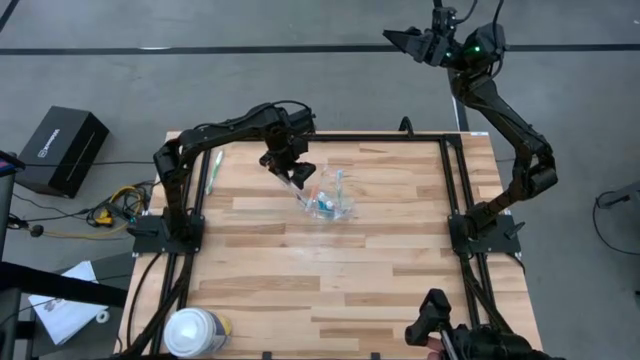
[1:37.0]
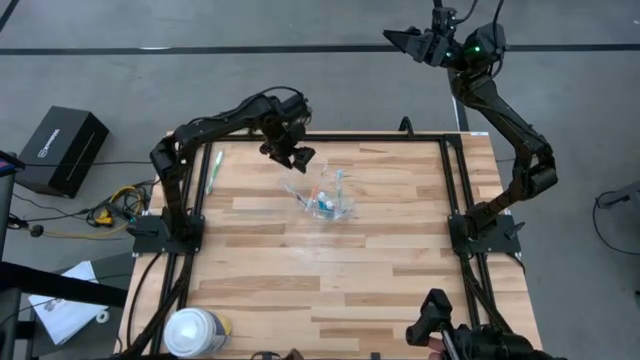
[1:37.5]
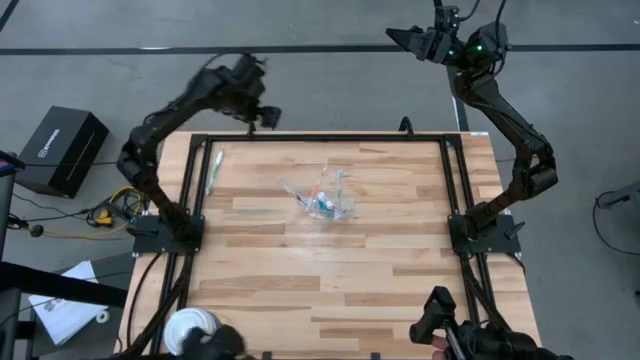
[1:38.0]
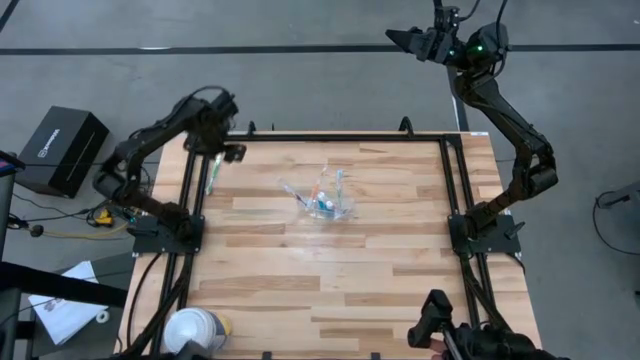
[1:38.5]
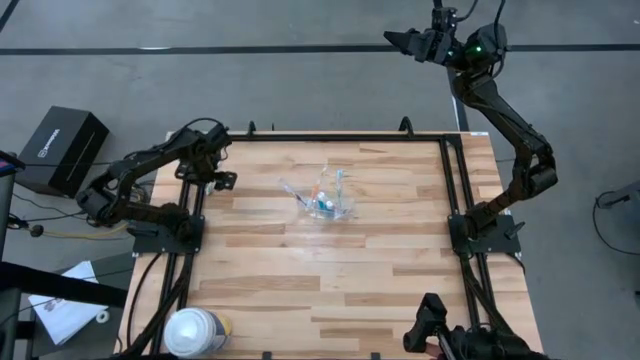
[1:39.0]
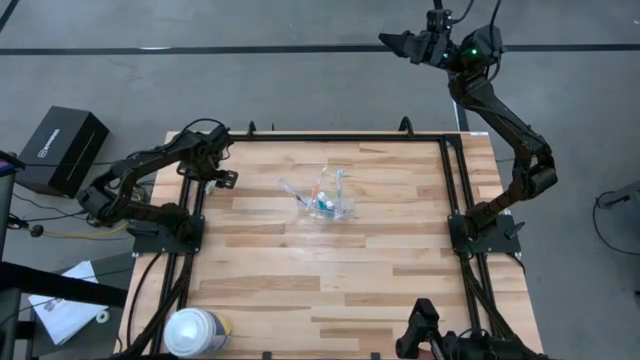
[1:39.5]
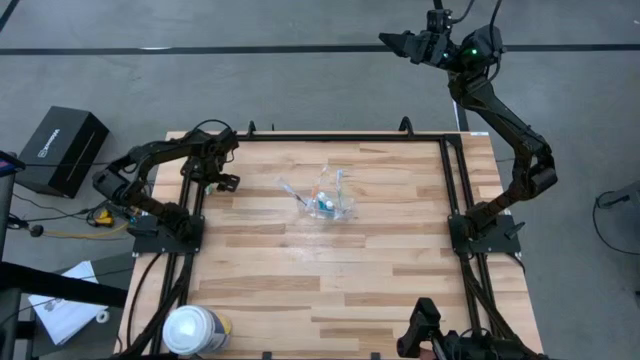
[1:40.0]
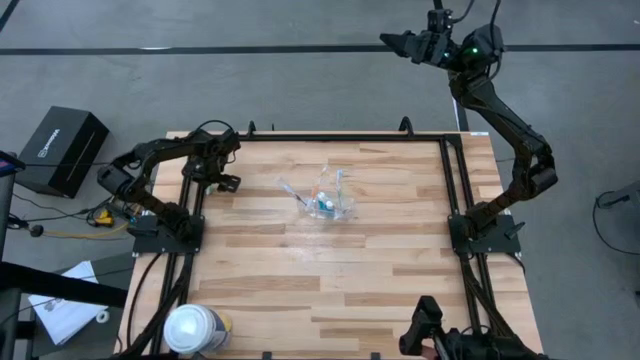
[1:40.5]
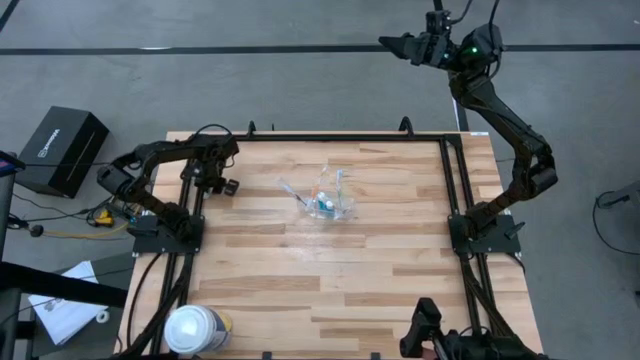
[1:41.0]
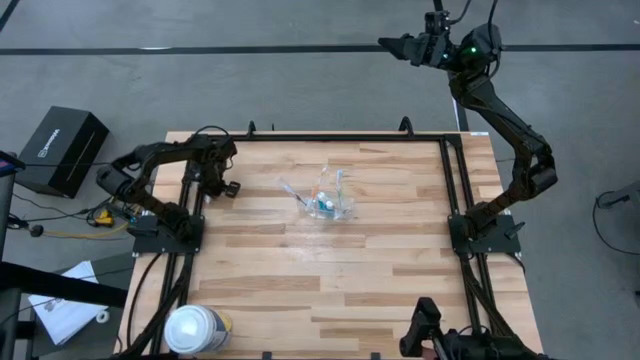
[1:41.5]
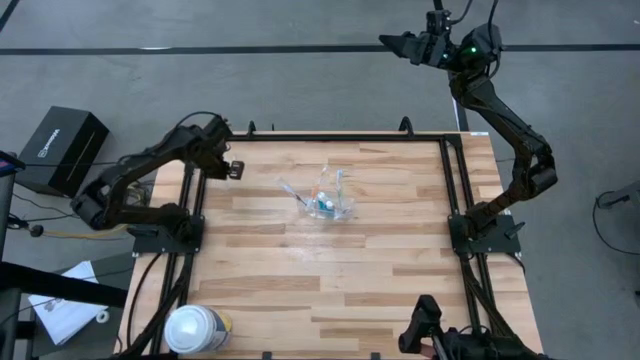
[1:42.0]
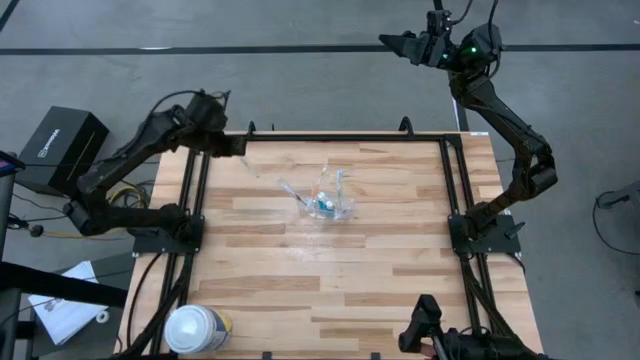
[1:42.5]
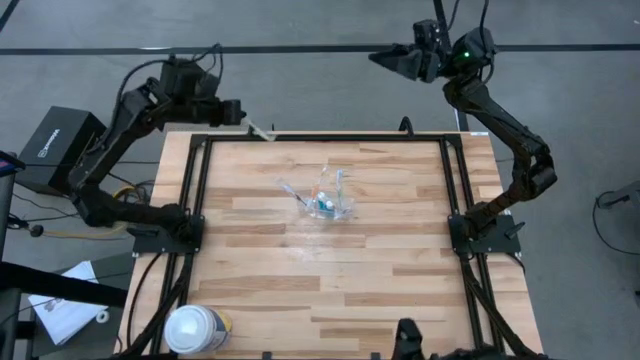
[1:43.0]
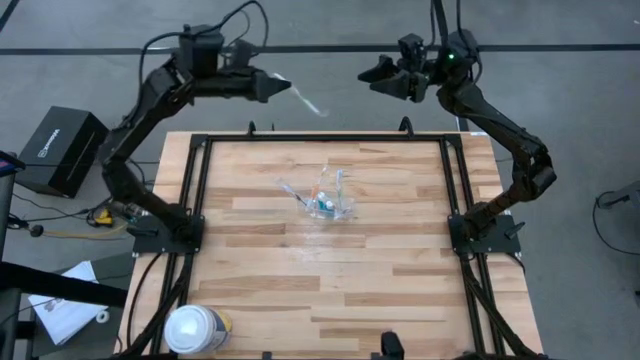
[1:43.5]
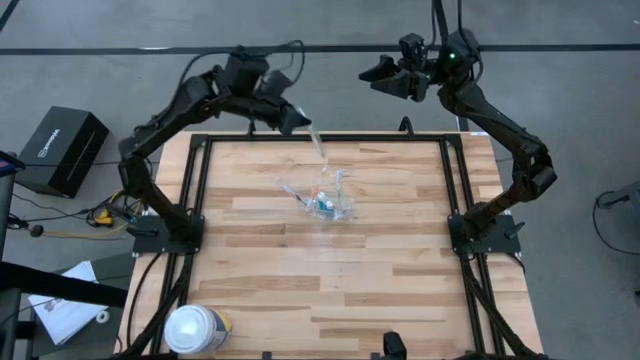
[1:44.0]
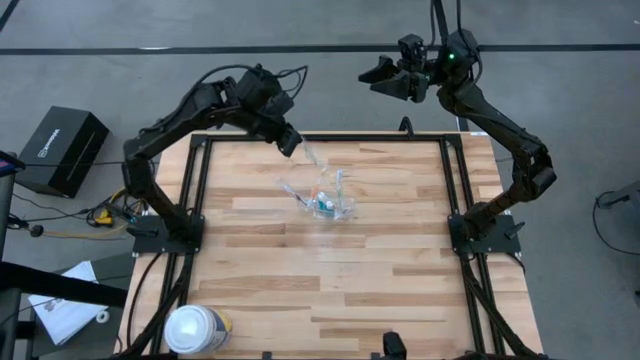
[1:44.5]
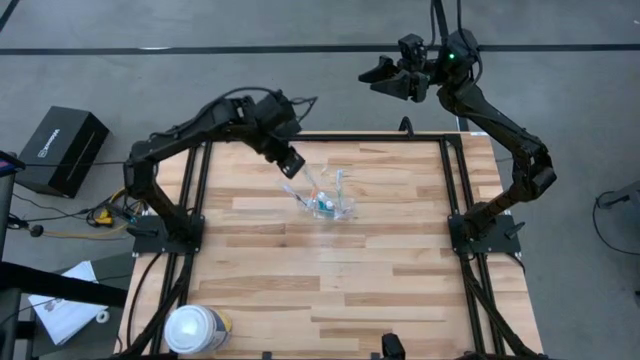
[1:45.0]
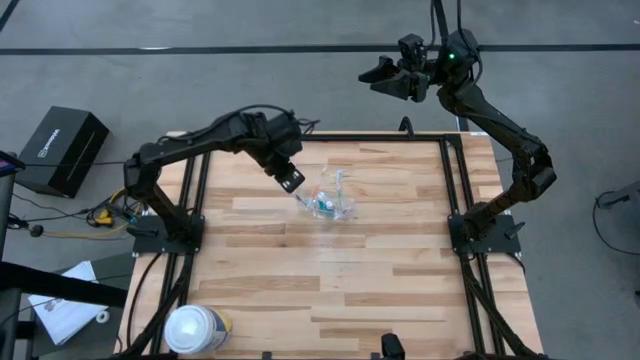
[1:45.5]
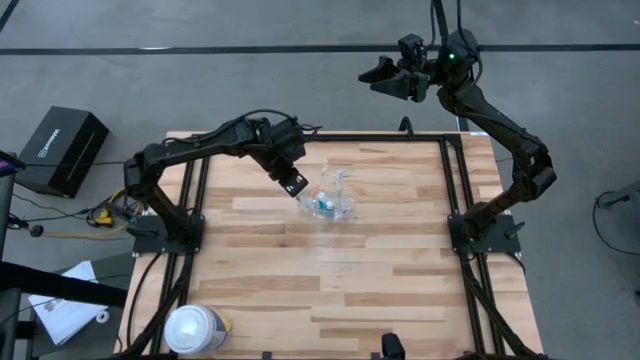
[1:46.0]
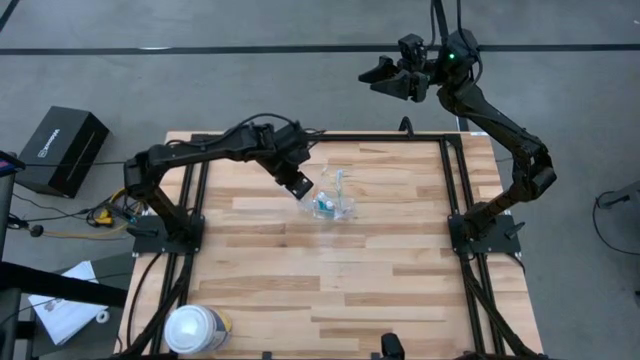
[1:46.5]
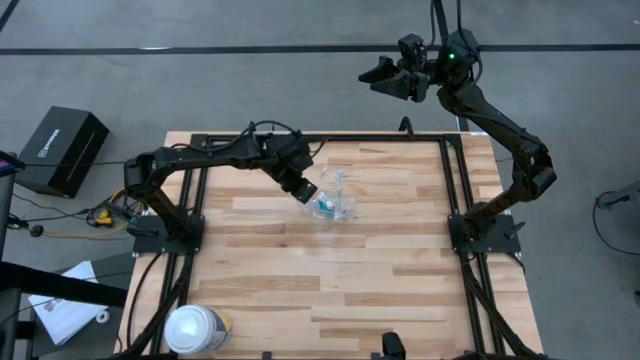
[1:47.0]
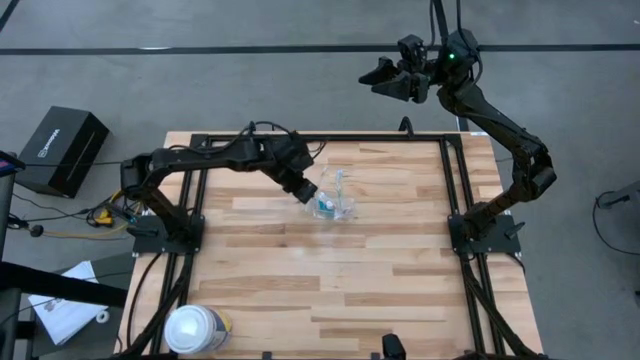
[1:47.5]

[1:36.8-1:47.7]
Task: Pick & Place toothbrushing station
Put the green toothbrush into the transparent organizer

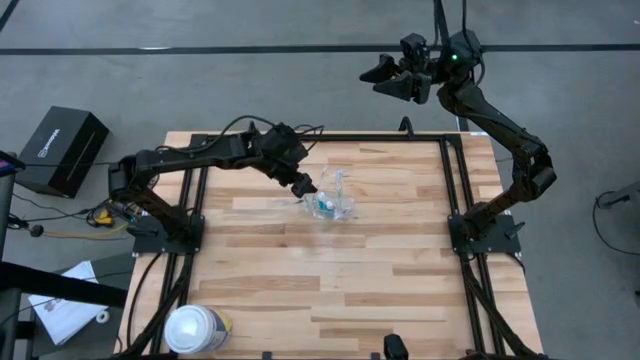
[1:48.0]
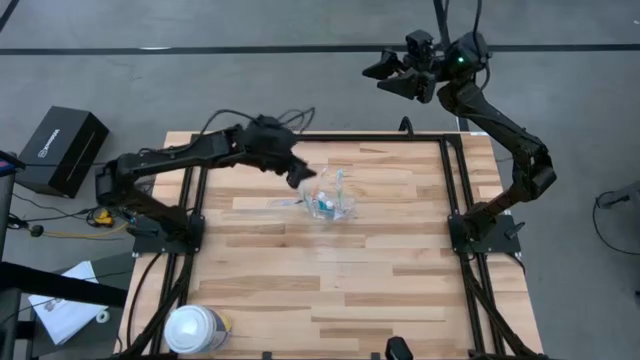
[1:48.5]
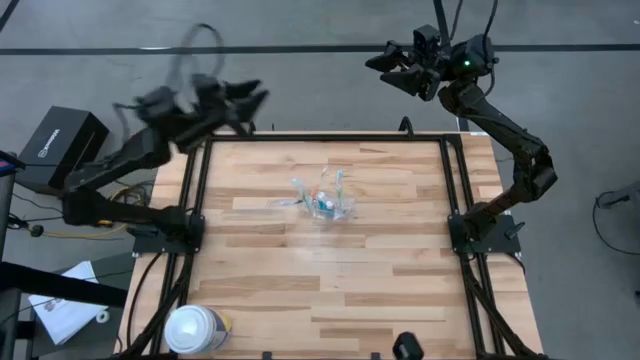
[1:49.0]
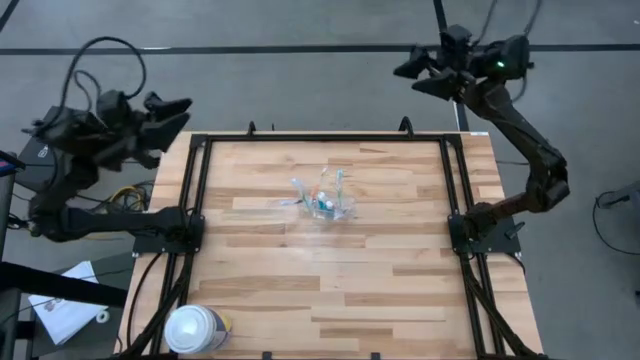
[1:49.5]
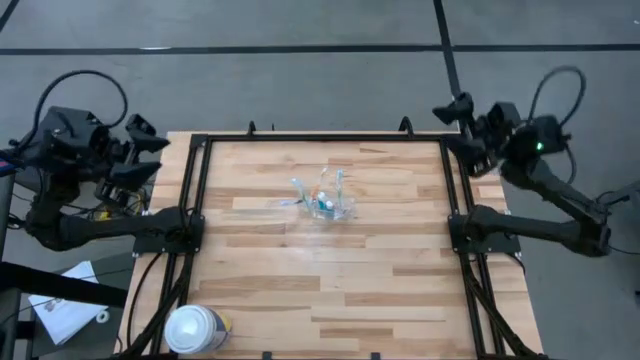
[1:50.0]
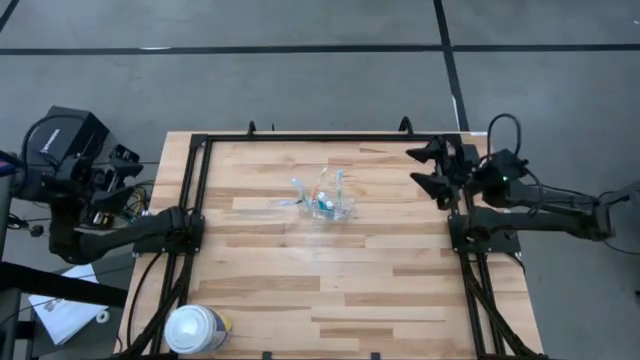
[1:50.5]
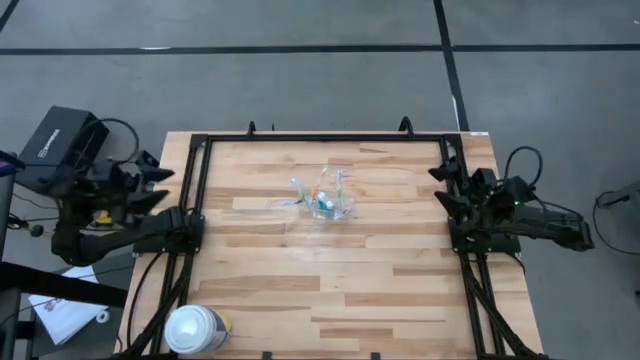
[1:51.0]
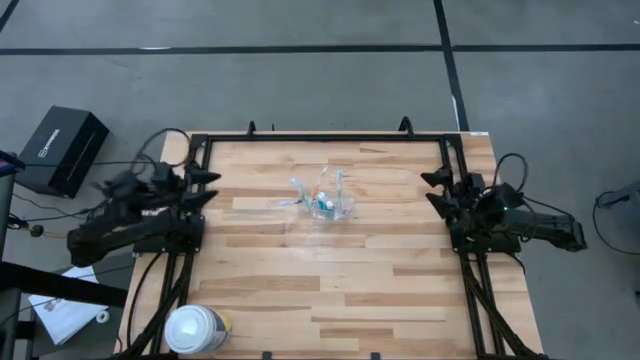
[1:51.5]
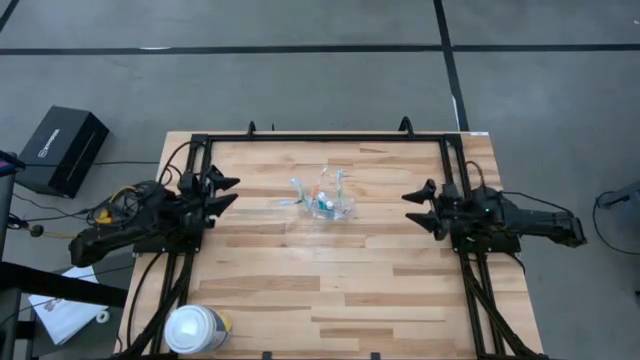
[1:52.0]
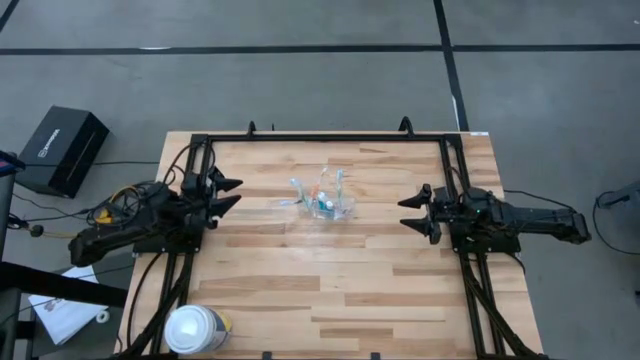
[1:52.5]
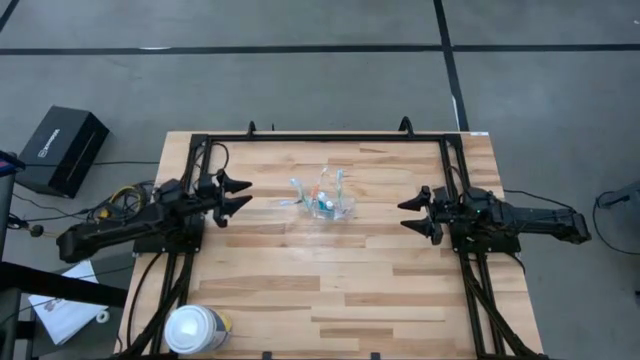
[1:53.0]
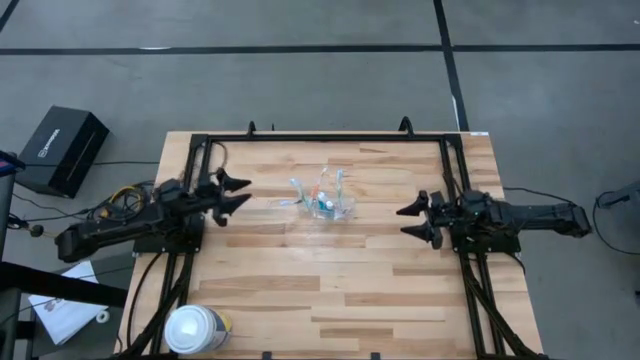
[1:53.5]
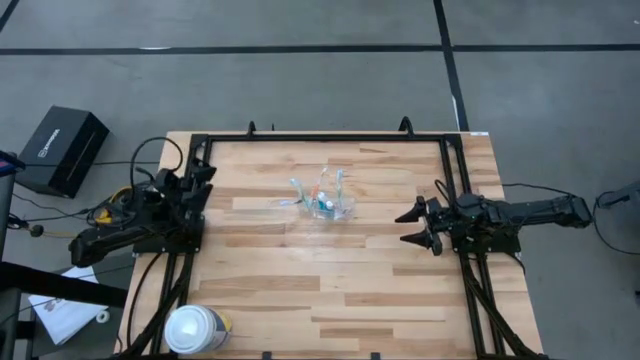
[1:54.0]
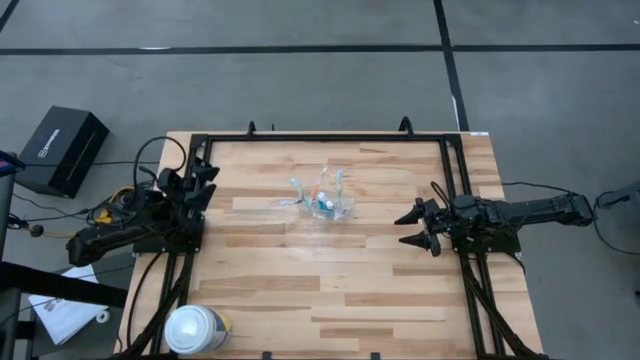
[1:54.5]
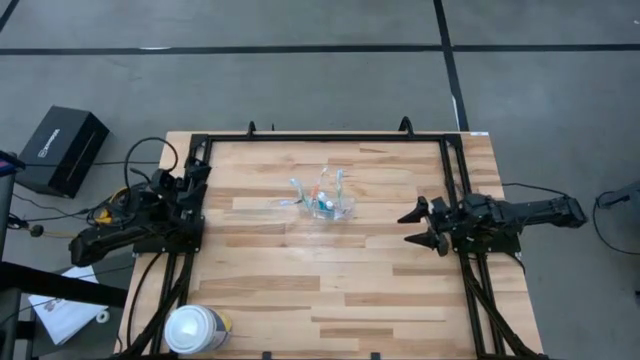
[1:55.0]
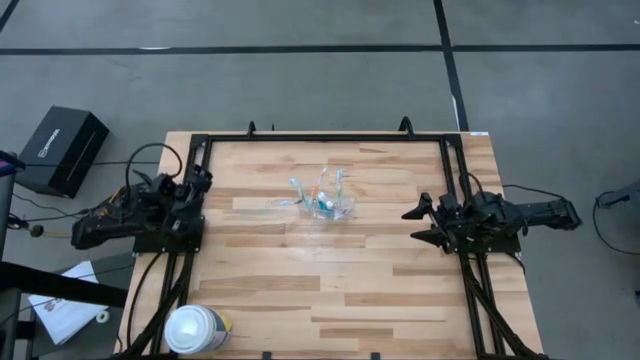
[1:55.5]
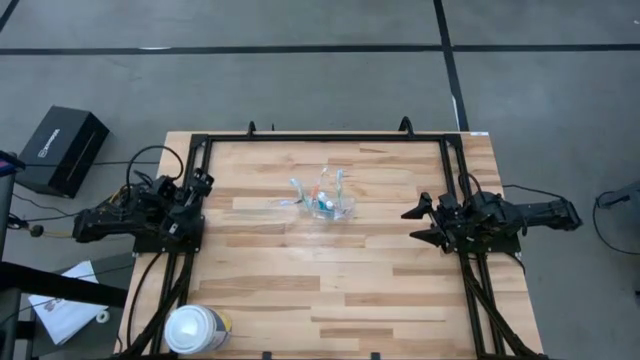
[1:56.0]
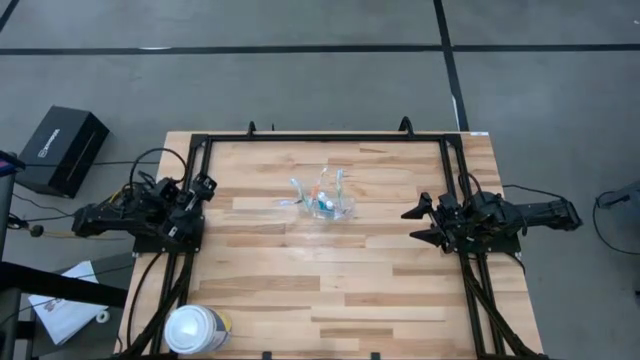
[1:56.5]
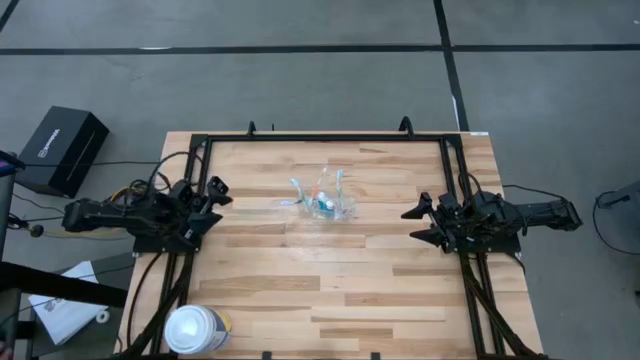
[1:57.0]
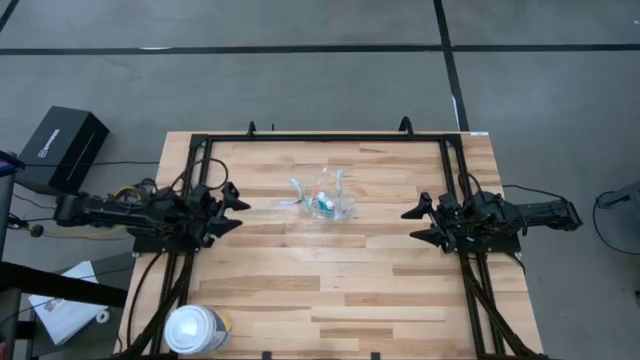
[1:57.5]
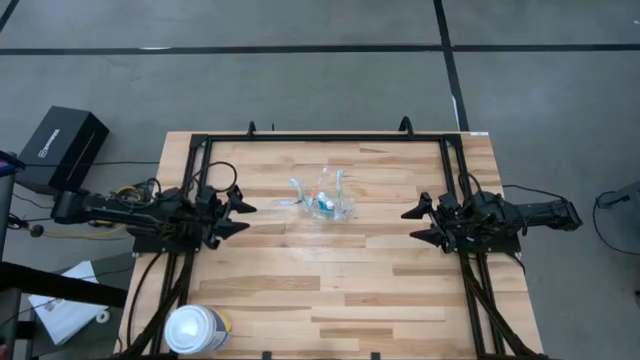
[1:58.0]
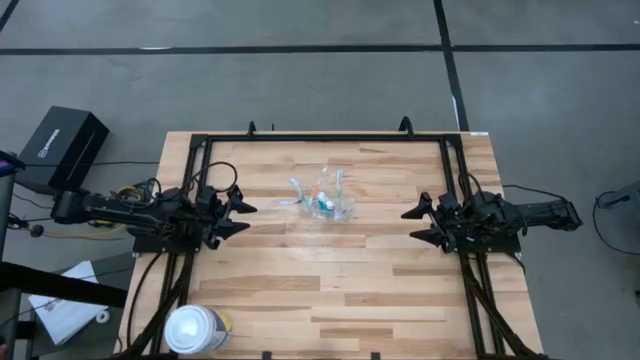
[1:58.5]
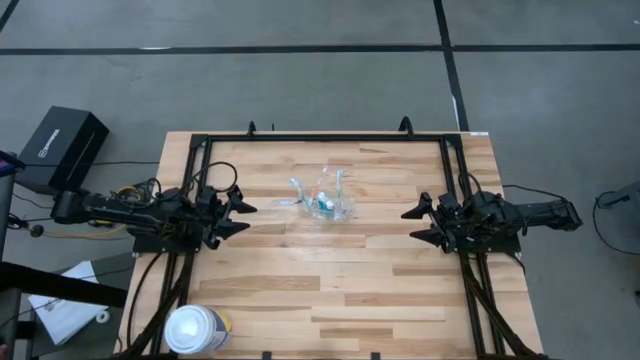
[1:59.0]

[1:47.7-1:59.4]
Return to Home Position
